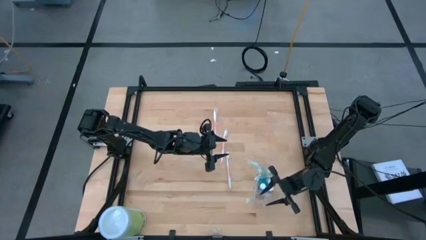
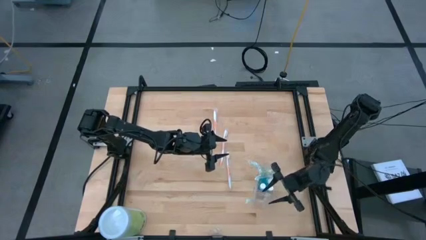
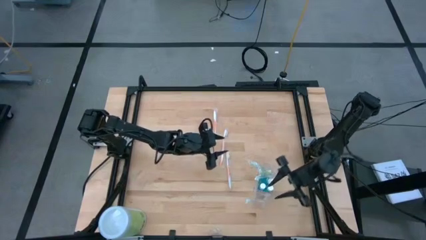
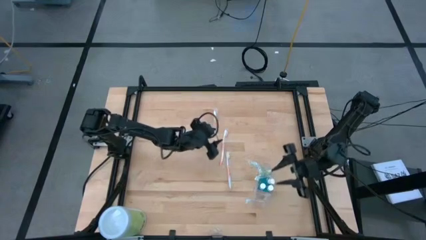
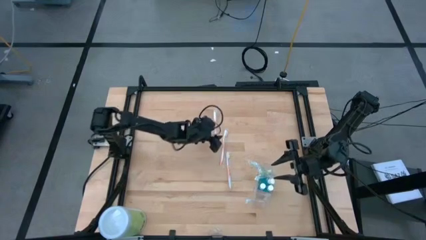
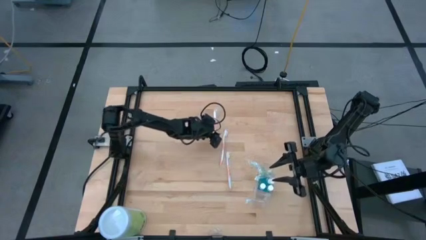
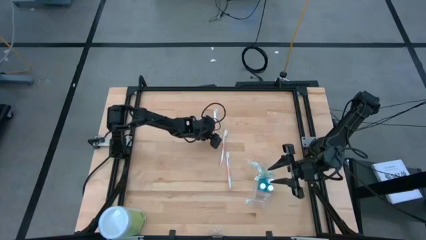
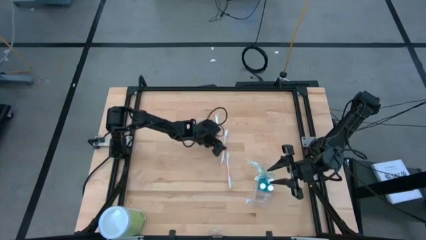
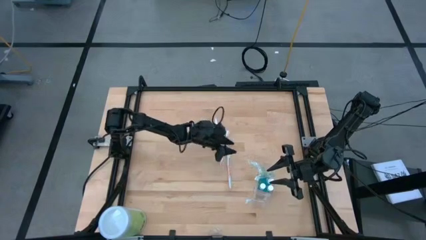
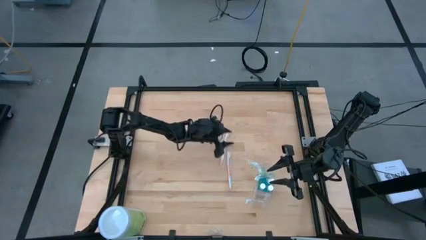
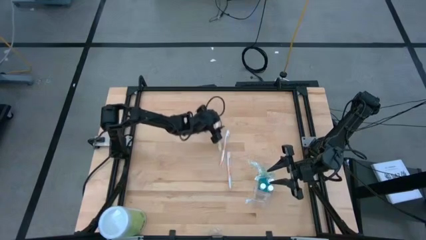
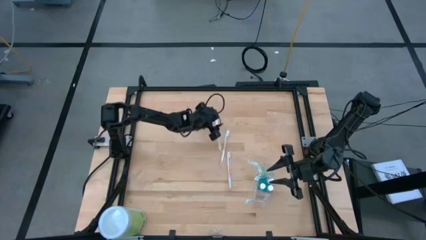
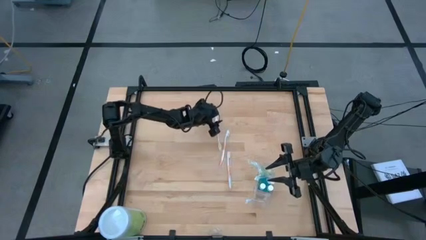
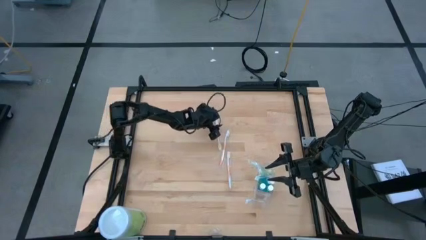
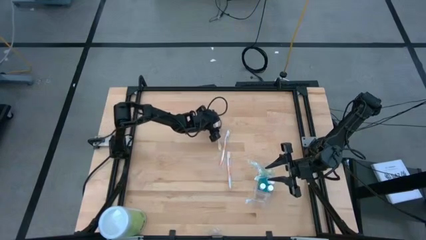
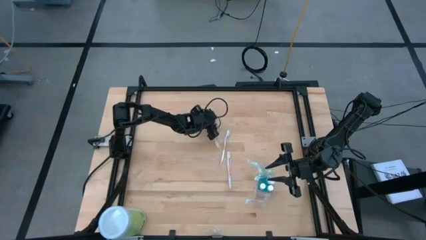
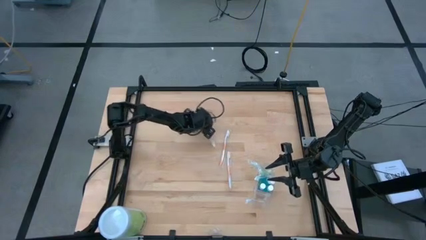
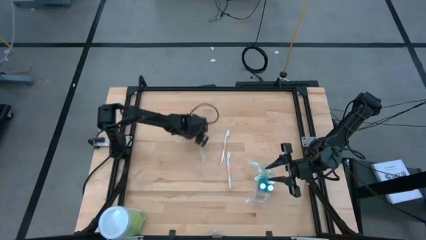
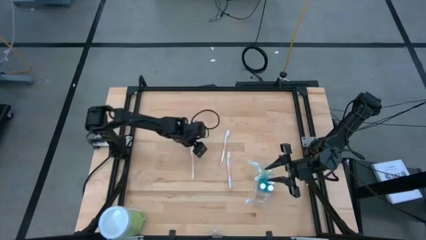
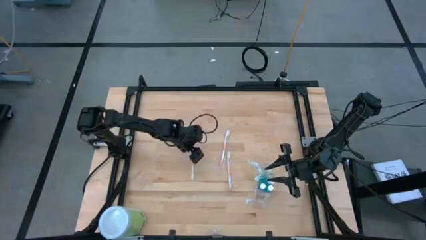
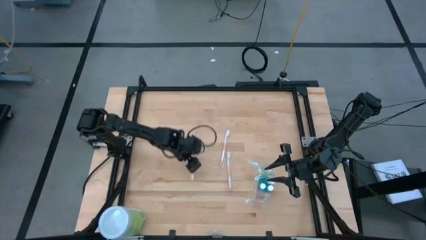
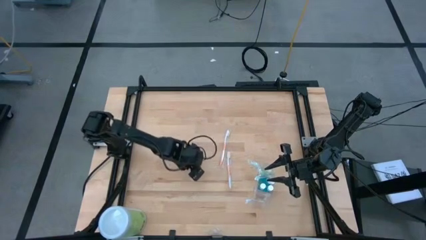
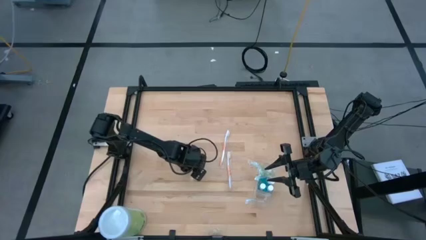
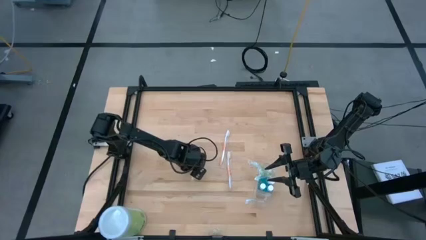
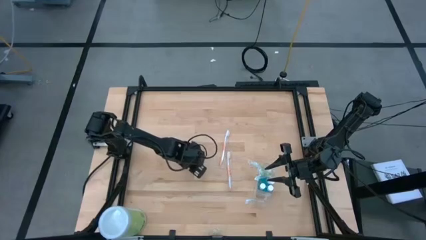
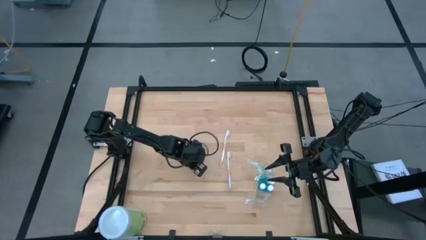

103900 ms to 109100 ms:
Task: Pick & Place toothbrushing station
Put the orange toothbrush into the bottom section of the transparent organizer

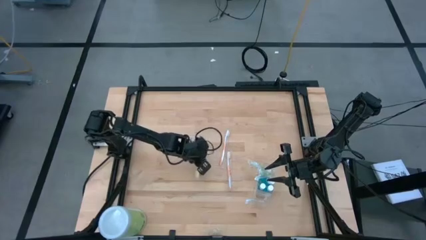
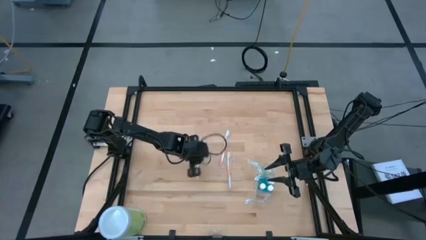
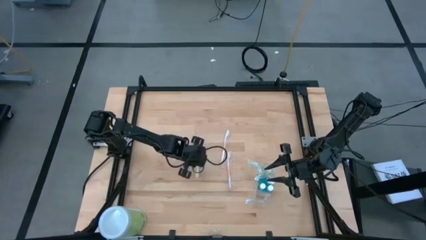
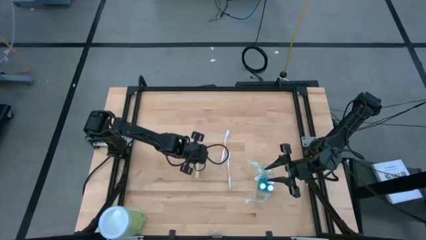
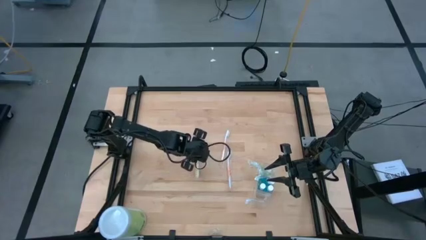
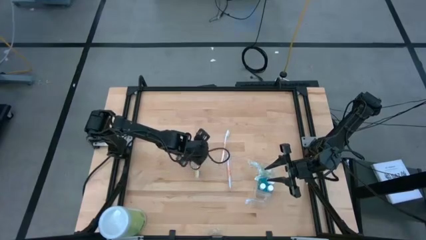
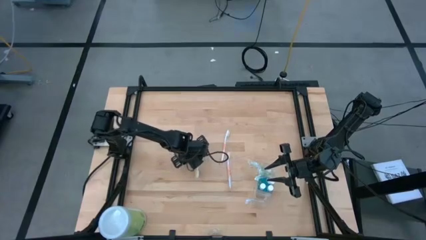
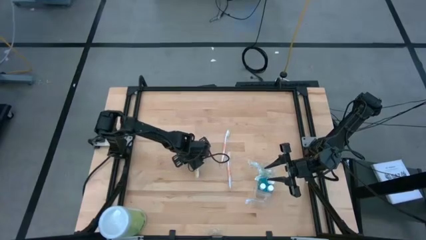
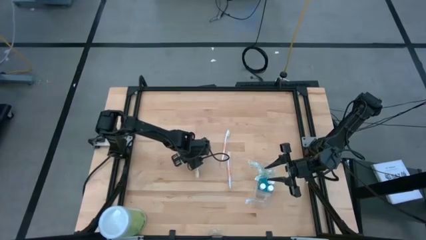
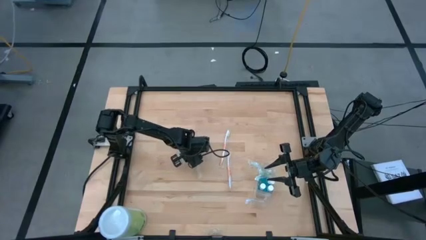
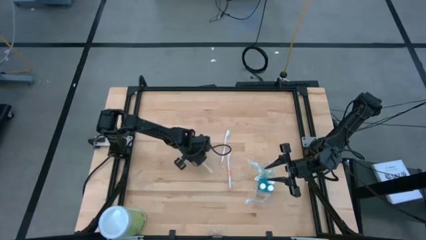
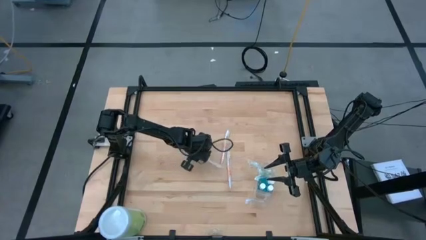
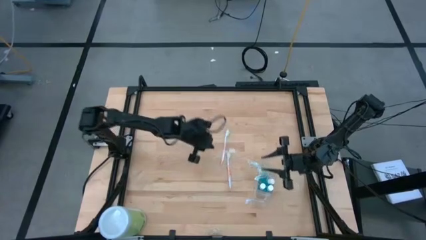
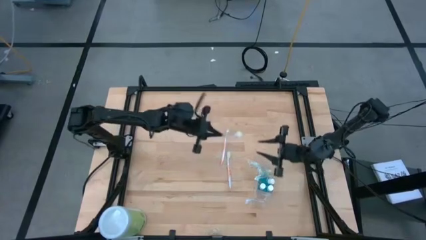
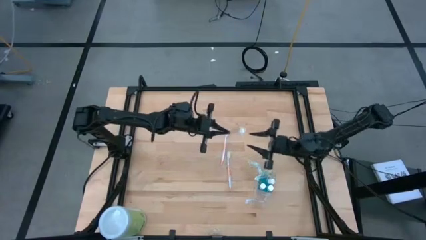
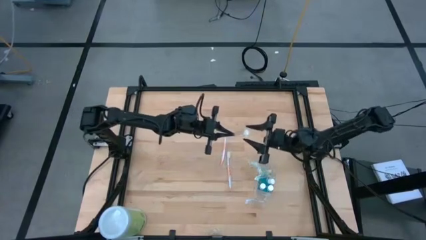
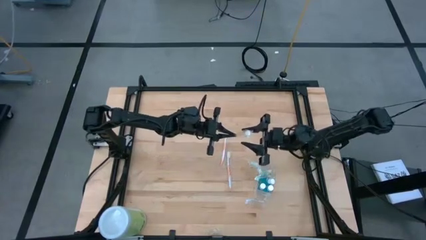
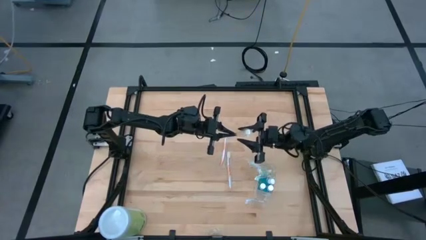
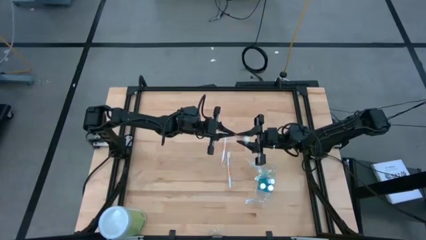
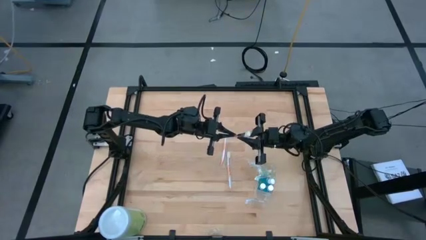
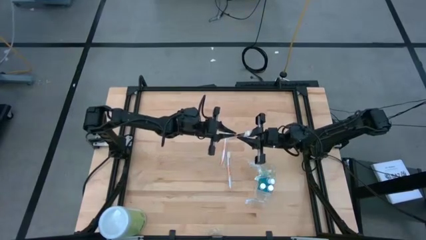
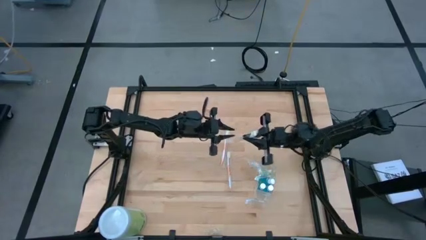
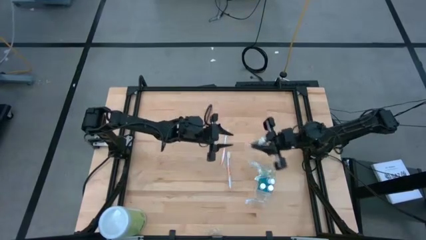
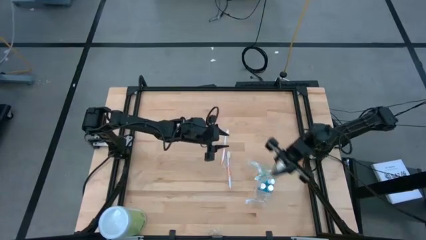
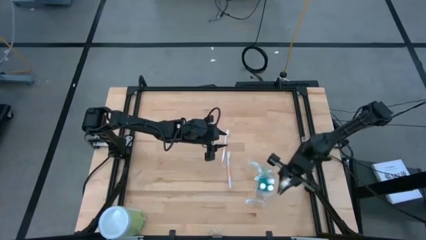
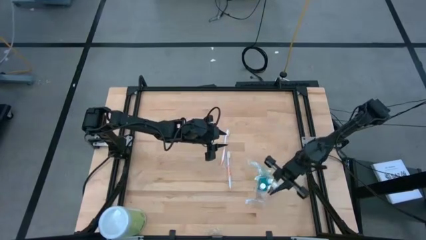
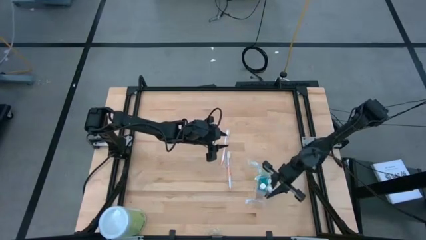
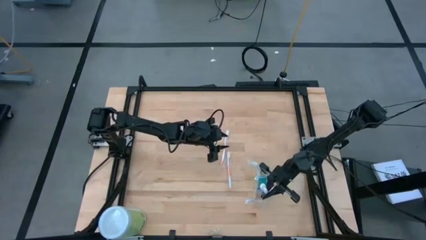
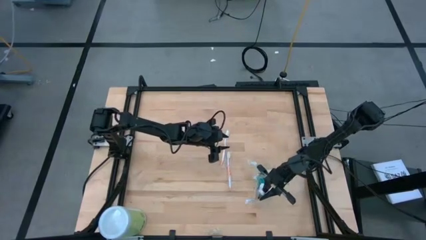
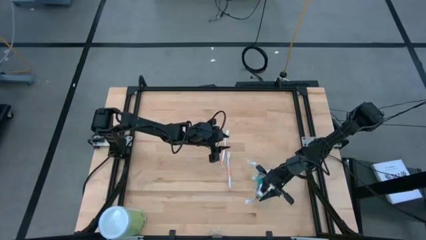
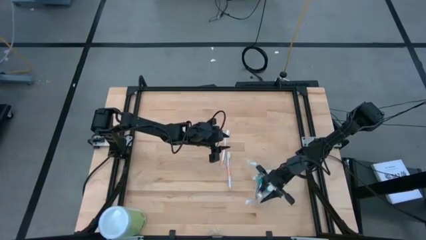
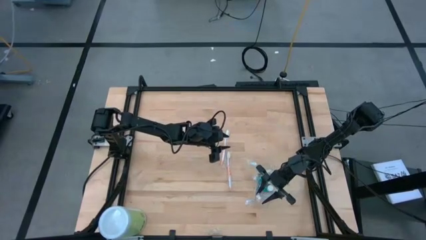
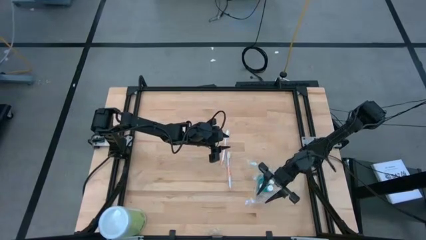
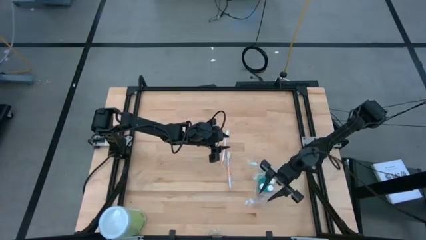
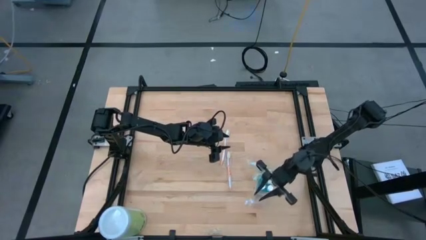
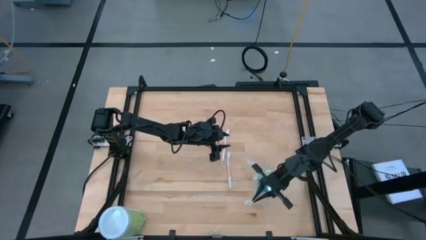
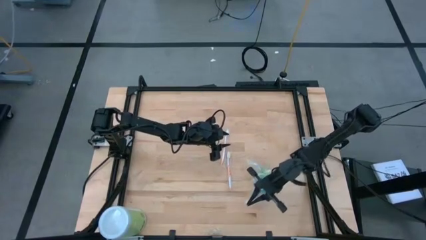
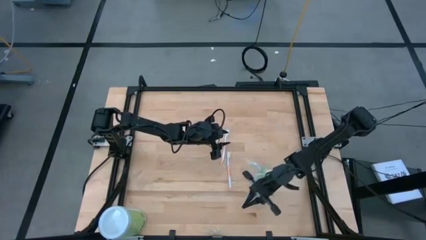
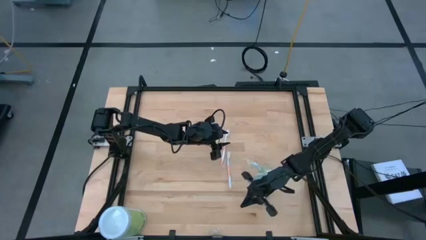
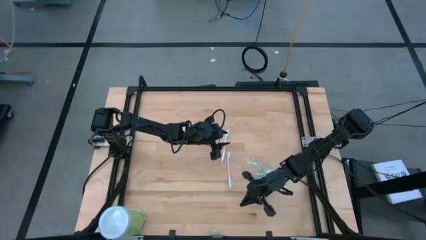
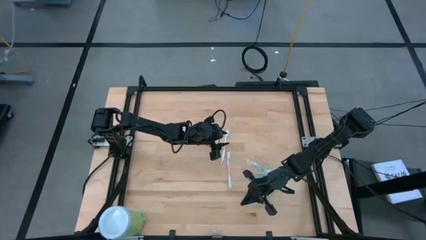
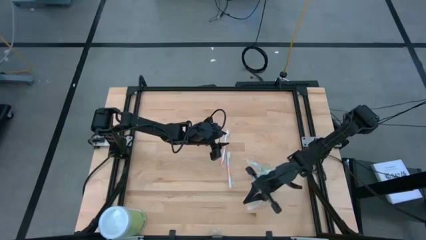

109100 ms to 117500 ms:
Put the orange toothbrush into the bottom section of the transparent organizer

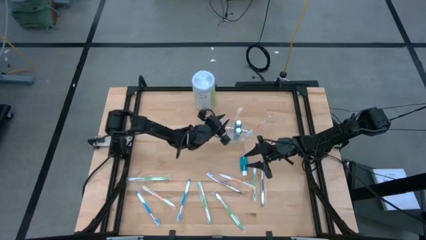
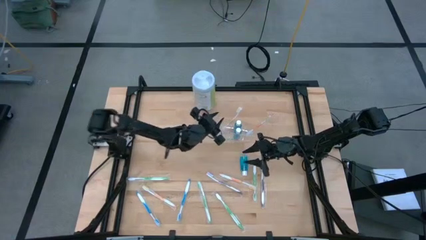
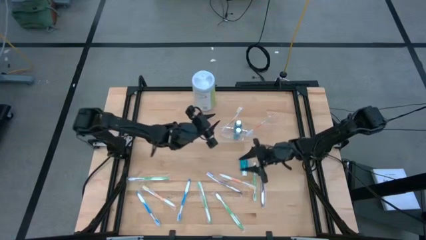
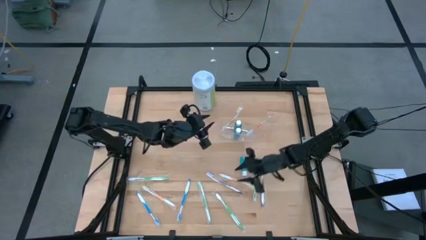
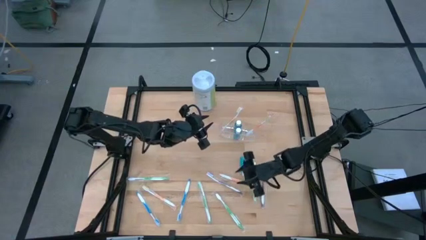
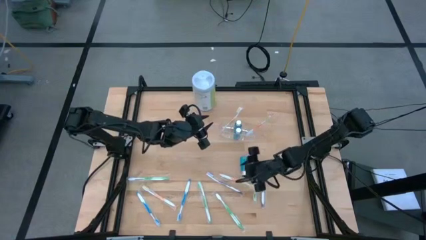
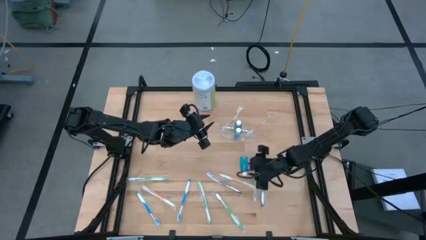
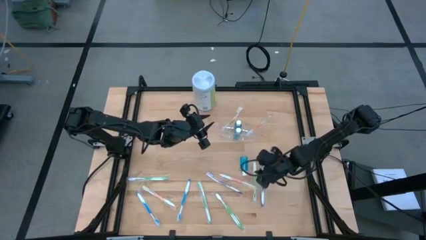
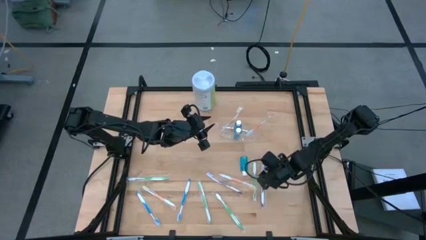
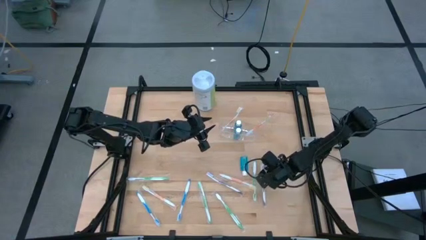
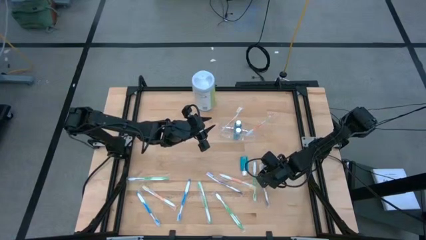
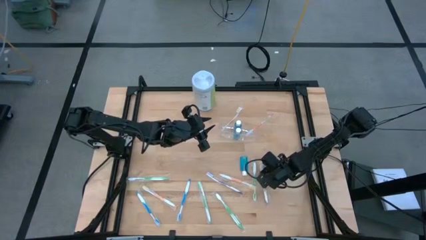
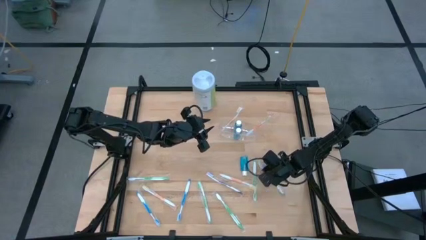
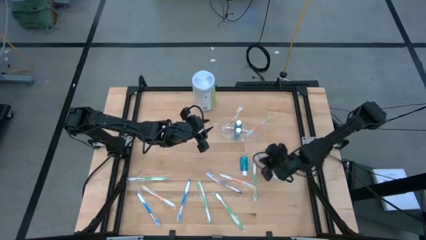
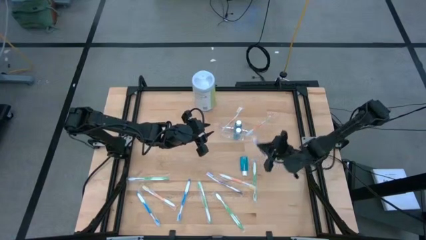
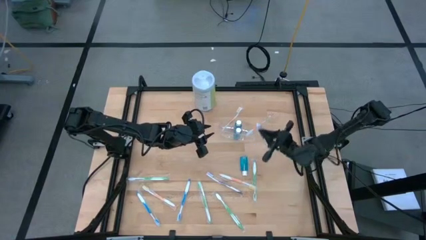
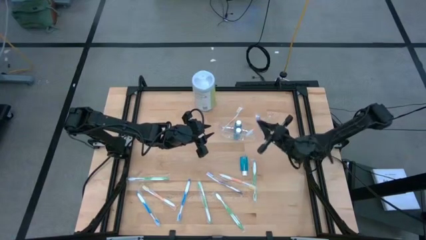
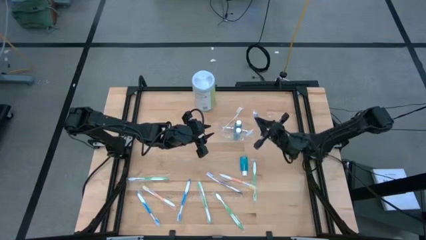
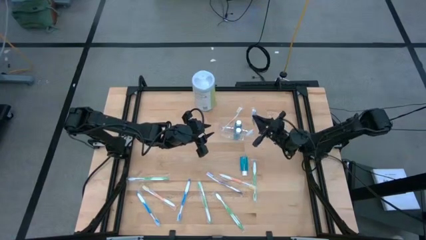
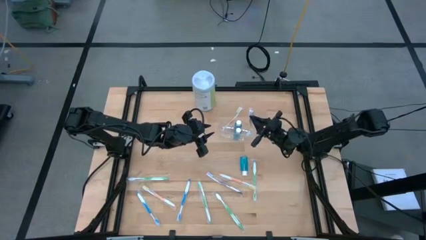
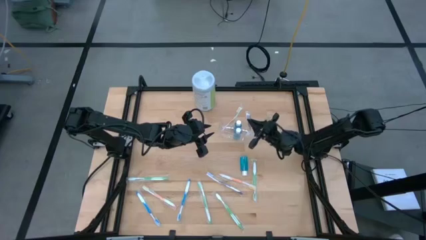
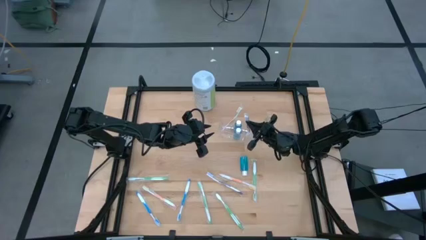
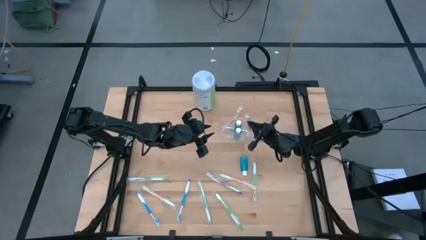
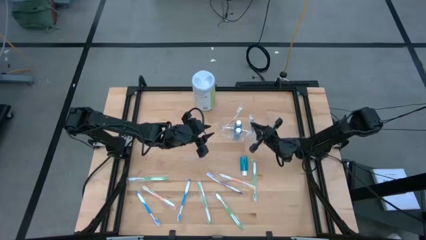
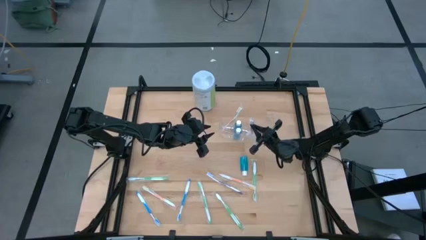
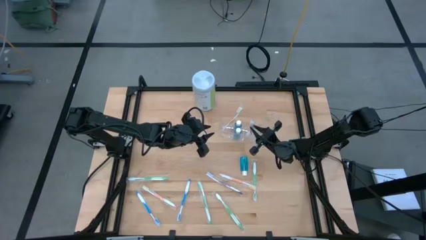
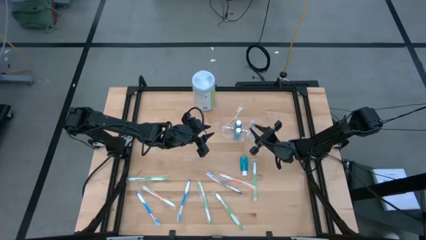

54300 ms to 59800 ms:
Task: Pick & Place toothbrushing station
Put the purple toothbrush into the transparent organizer
